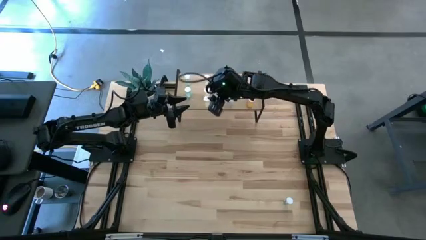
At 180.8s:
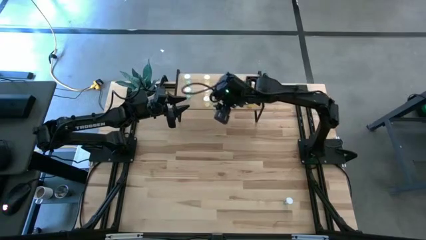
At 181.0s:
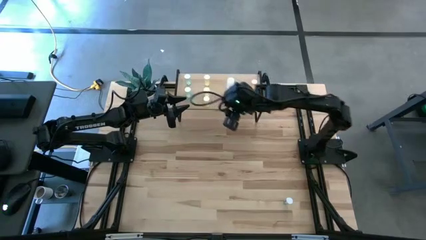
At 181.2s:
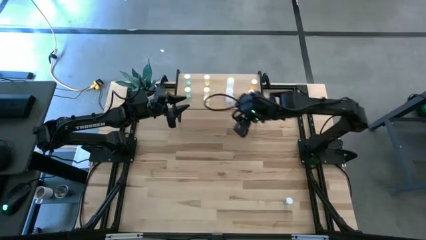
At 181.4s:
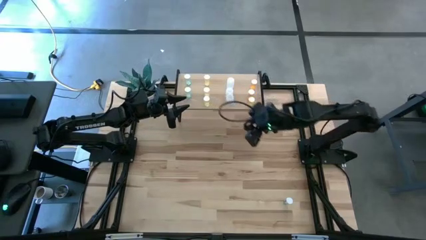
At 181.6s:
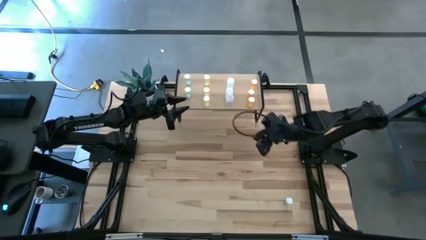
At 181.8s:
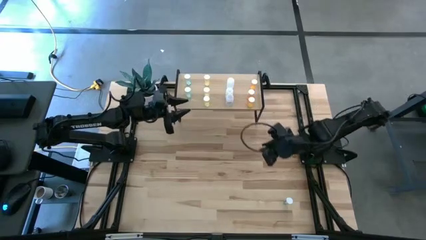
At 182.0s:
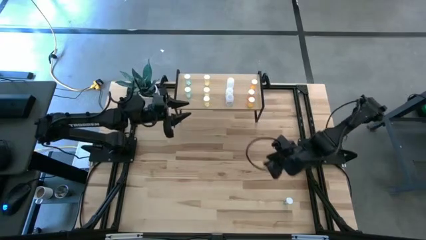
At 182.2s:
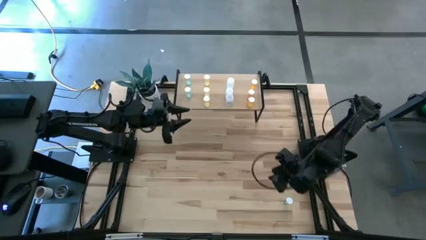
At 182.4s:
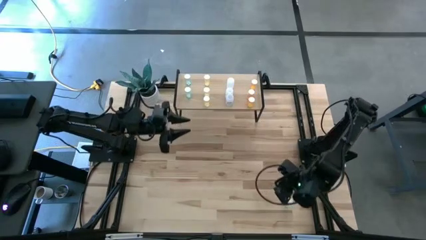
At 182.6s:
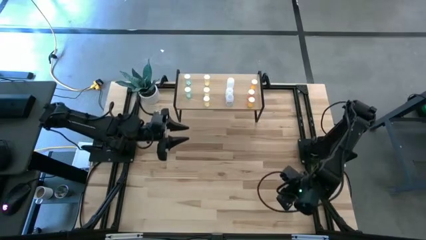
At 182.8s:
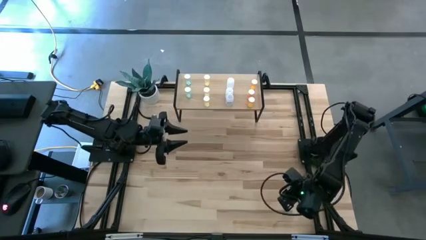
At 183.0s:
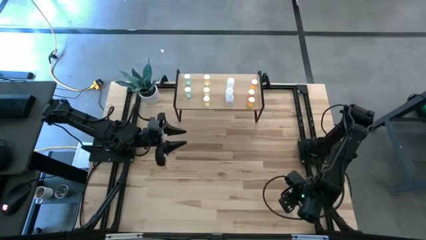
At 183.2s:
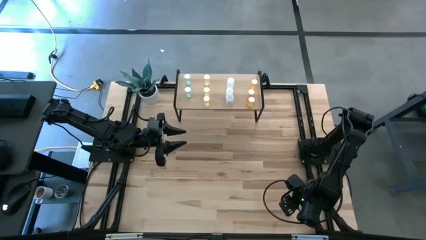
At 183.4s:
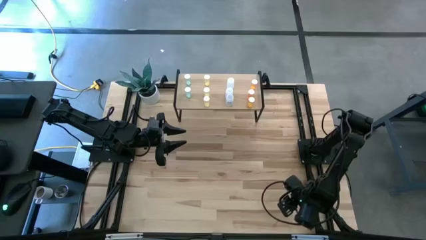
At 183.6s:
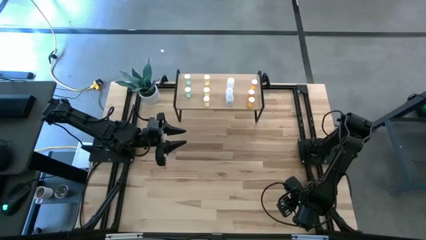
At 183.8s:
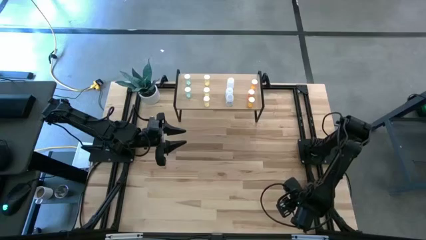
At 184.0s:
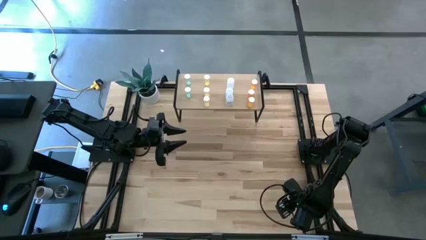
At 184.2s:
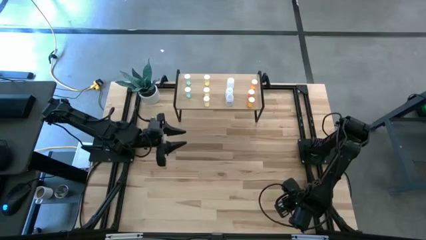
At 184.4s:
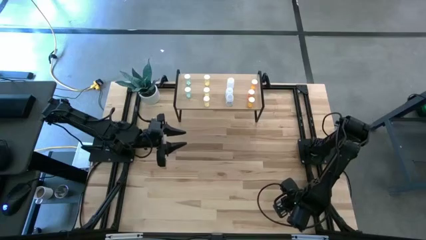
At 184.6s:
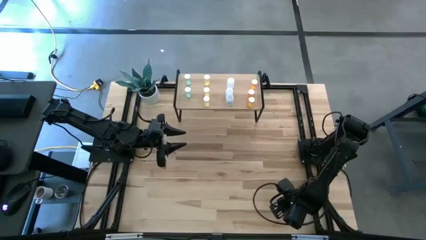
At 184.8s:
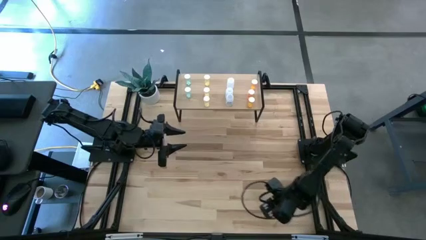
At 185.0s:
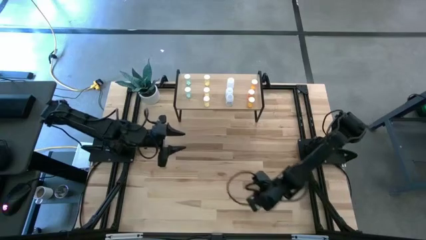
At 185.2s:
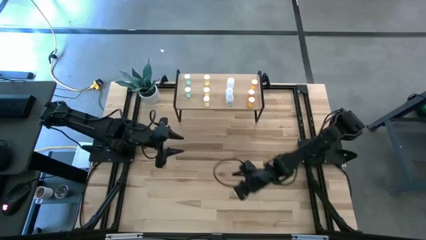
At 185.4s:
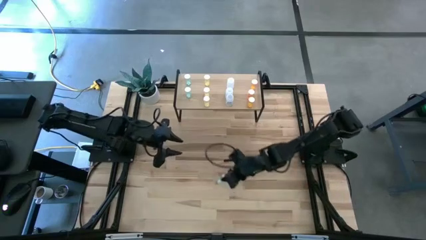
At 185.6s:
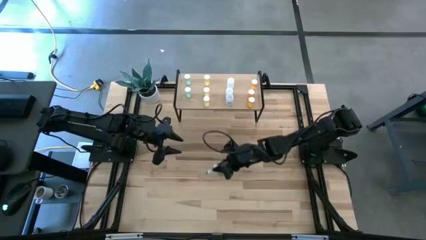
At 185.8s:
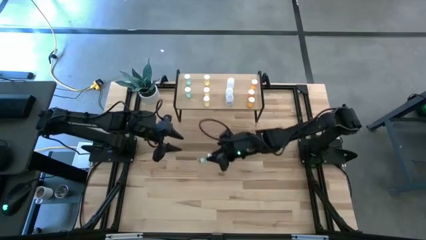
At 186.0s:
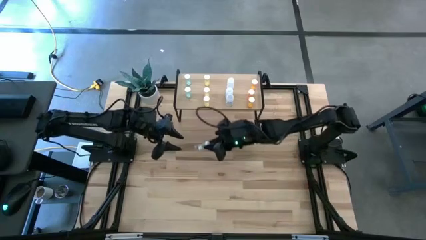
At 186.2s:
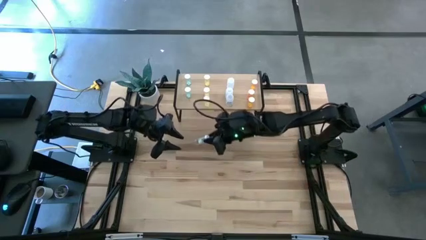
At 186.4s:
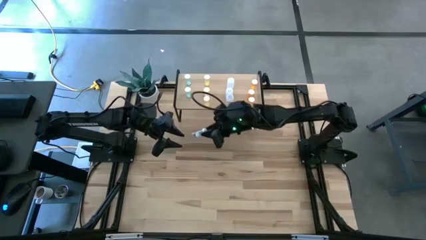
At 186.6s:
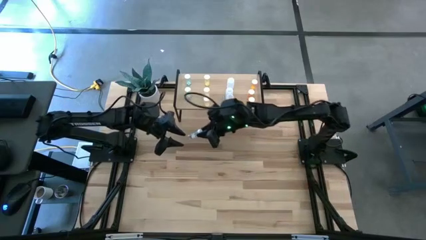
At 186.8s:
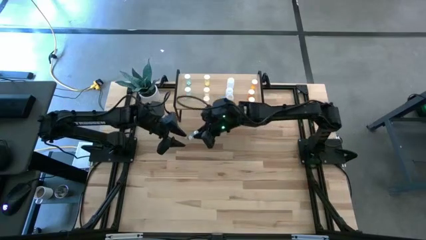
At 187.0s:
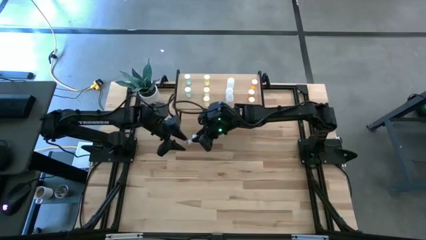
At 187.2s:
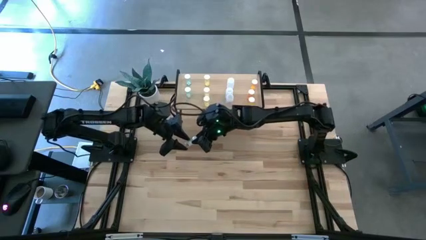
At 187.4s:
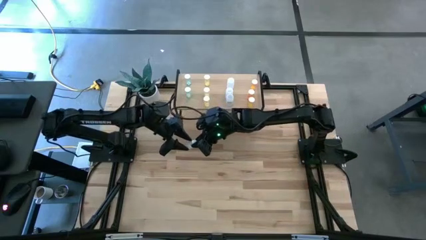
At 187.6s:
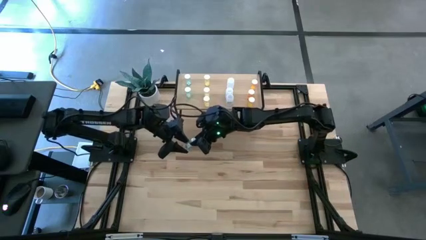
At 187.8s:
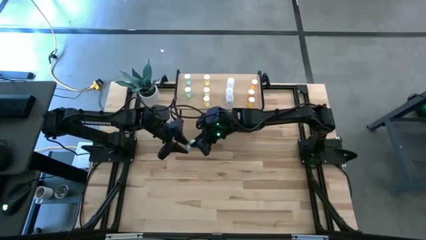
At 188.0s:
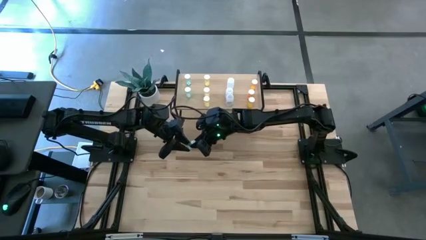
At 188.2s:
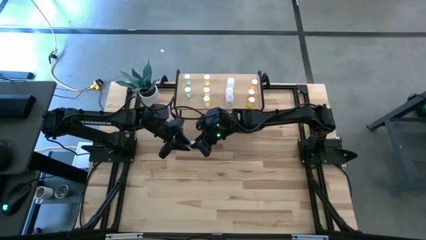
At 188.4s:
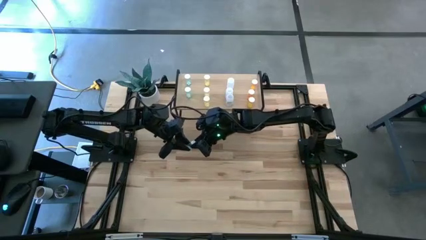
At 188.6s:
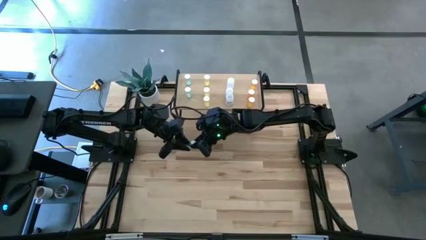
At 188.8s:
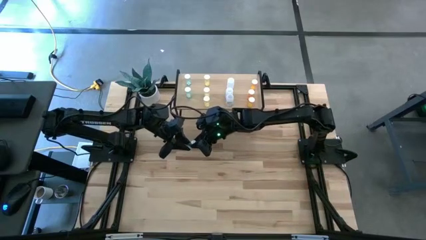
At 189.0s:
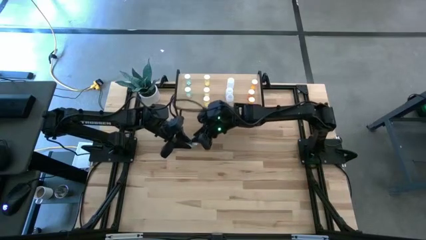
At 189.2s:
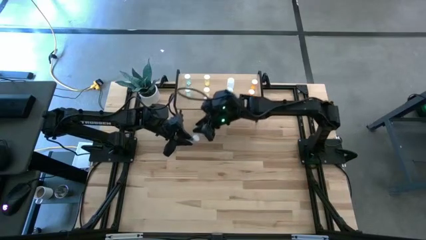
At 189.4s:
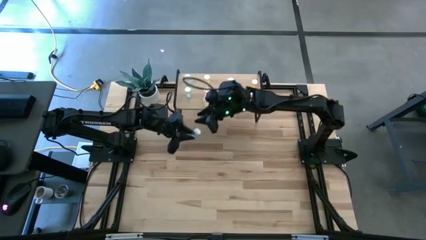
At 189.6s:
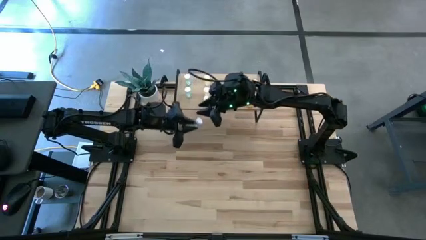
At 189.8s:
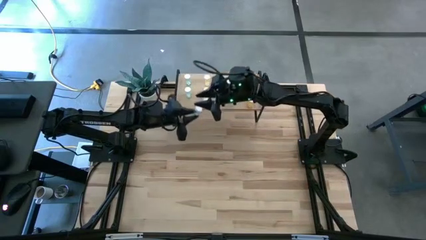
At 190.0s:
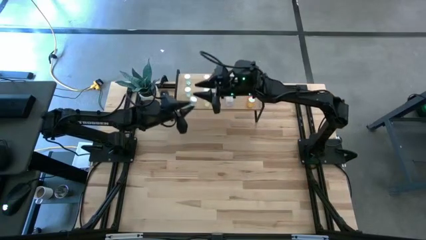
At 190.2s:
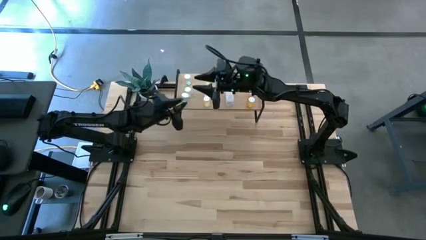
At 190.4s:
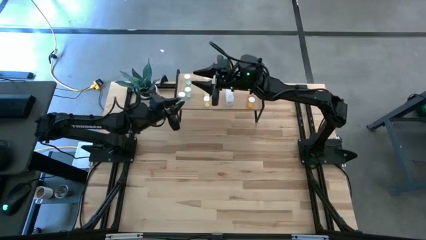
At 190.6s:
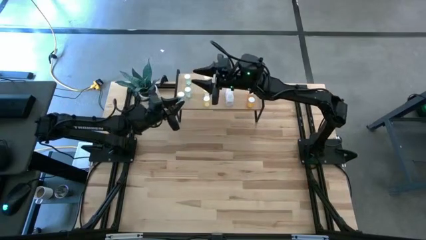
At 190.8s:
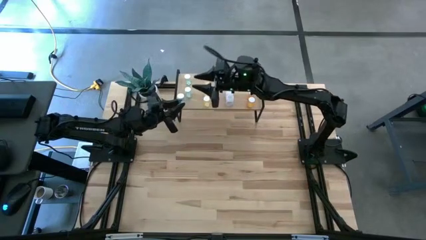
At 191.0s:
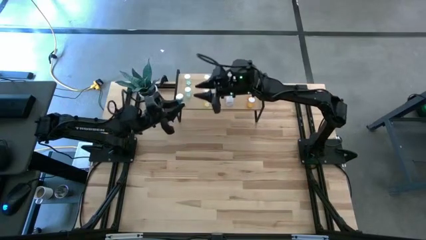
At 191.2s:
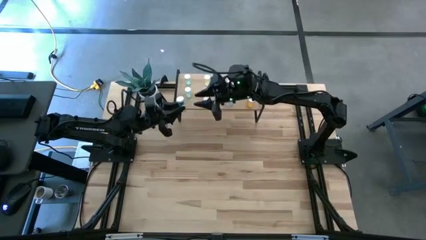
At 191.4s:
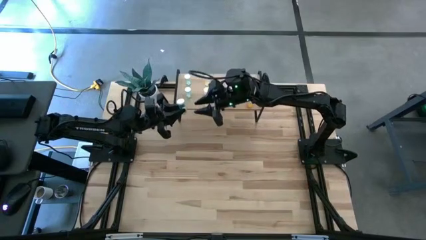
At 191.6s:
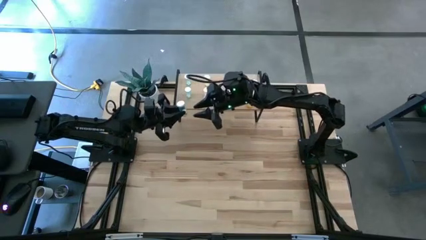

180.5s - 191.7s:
Task: Pick and place medicine bottles onto shelf by color
Put the blue pill bottle aligned with the other blue pill bottle on the shelf
